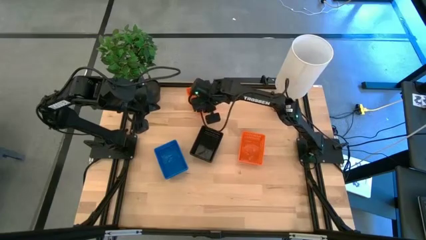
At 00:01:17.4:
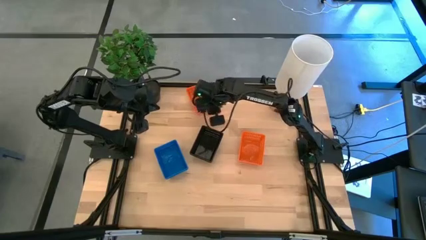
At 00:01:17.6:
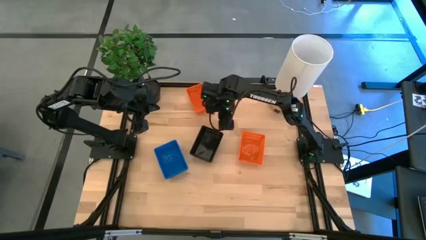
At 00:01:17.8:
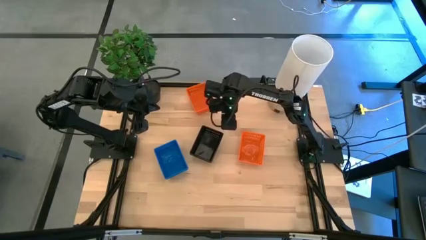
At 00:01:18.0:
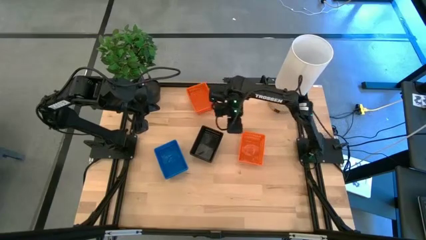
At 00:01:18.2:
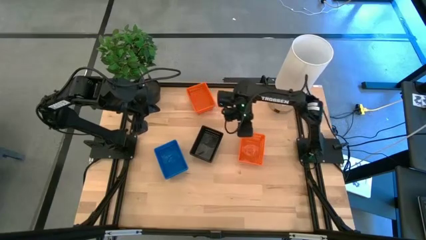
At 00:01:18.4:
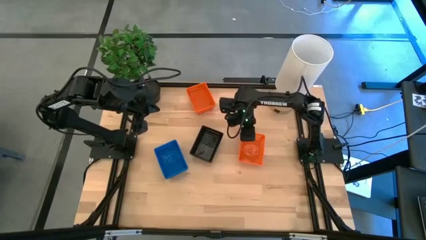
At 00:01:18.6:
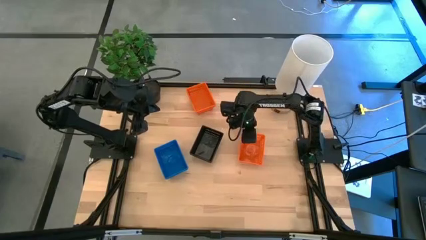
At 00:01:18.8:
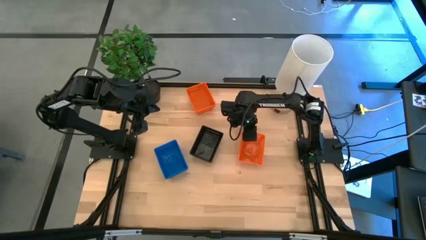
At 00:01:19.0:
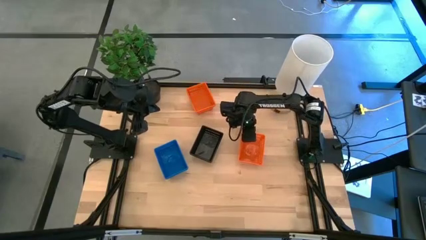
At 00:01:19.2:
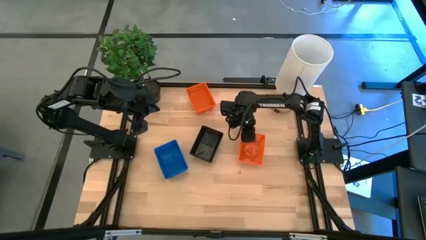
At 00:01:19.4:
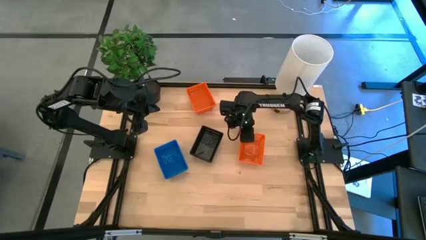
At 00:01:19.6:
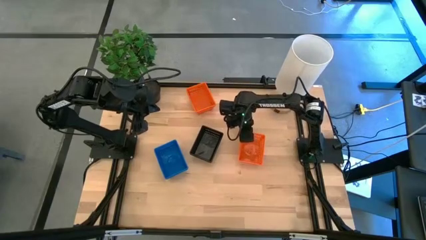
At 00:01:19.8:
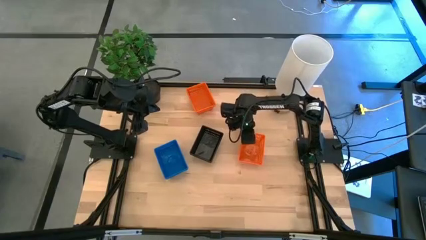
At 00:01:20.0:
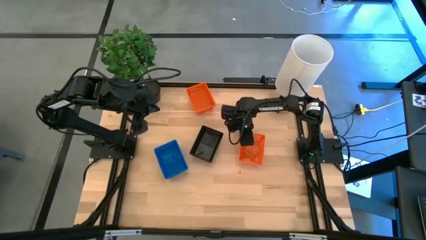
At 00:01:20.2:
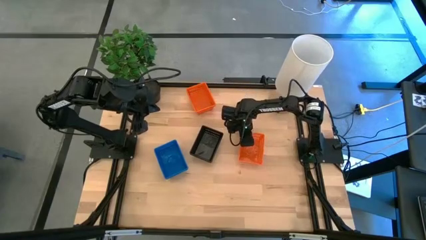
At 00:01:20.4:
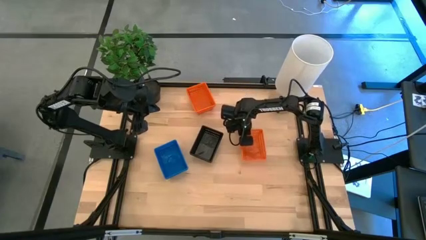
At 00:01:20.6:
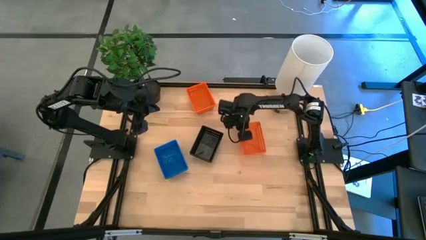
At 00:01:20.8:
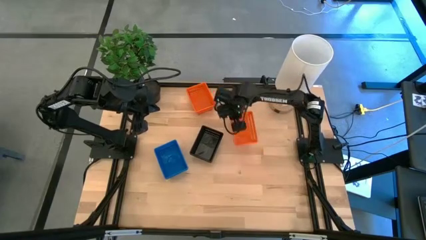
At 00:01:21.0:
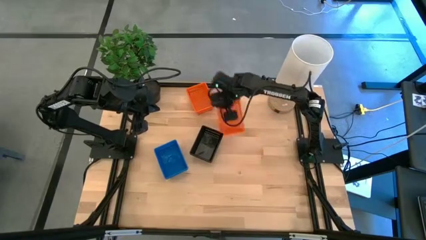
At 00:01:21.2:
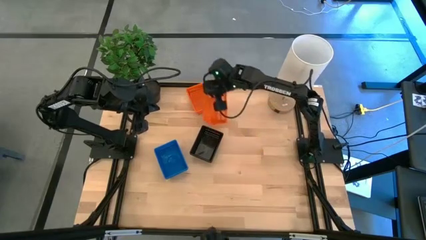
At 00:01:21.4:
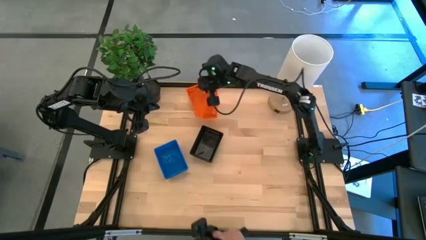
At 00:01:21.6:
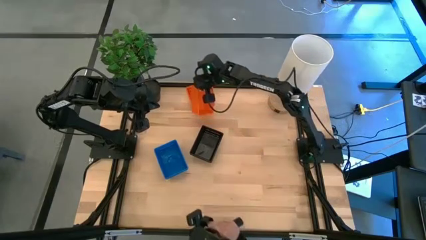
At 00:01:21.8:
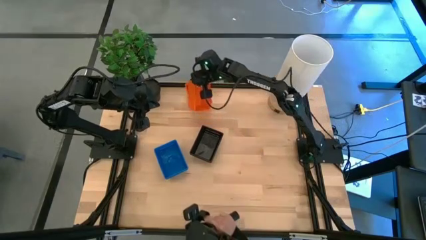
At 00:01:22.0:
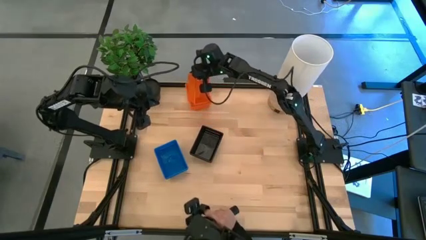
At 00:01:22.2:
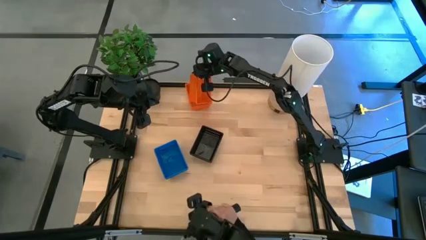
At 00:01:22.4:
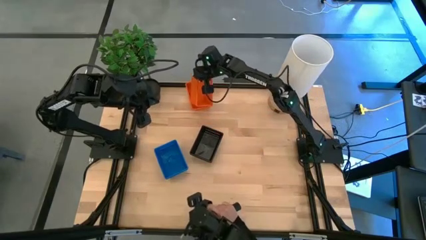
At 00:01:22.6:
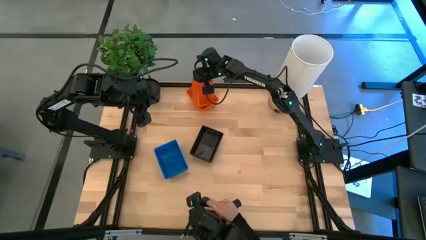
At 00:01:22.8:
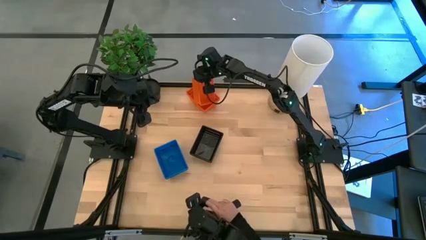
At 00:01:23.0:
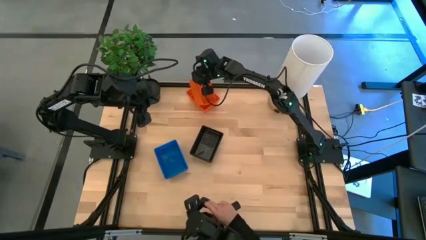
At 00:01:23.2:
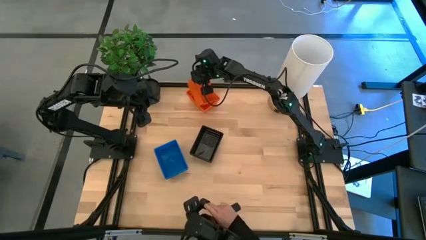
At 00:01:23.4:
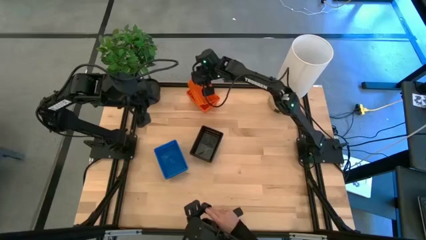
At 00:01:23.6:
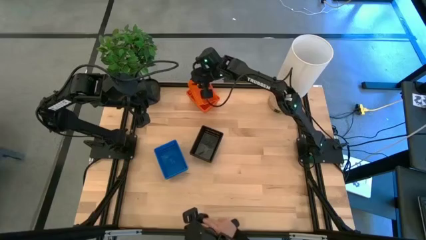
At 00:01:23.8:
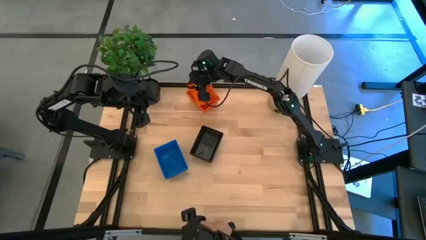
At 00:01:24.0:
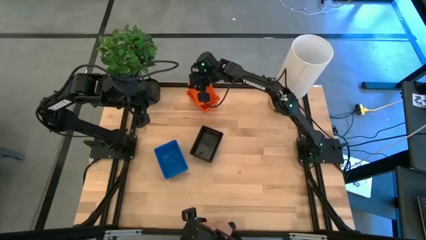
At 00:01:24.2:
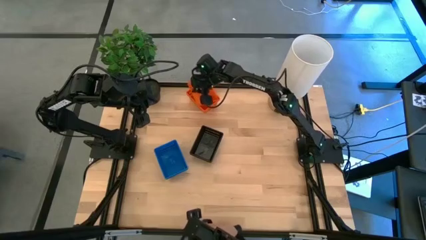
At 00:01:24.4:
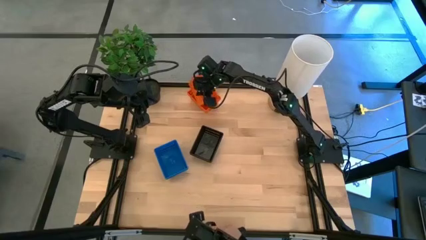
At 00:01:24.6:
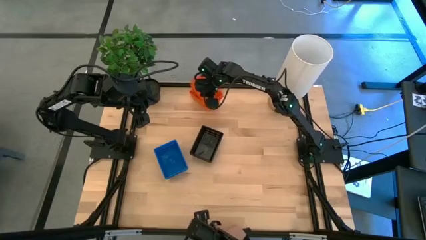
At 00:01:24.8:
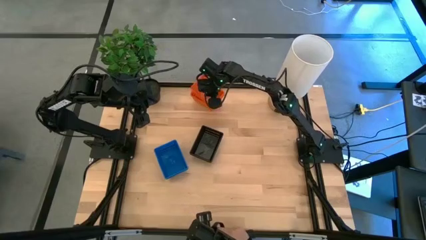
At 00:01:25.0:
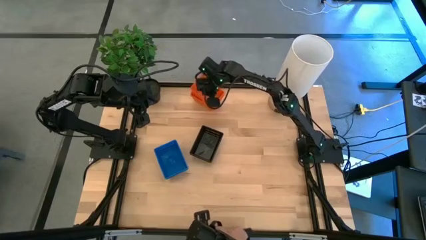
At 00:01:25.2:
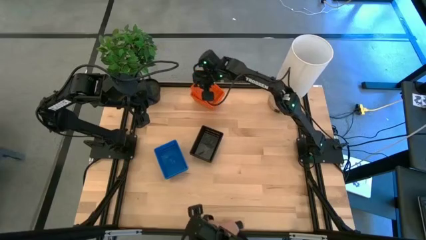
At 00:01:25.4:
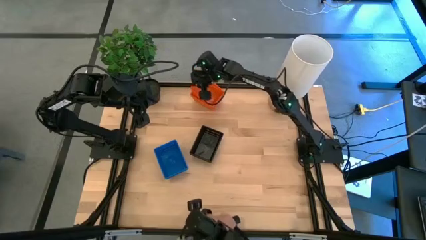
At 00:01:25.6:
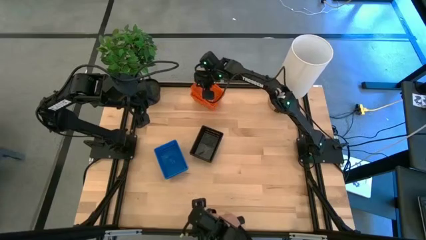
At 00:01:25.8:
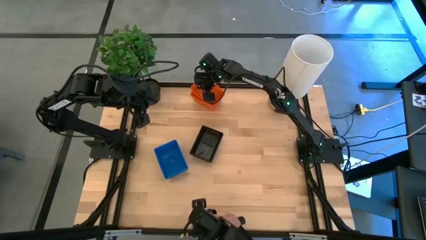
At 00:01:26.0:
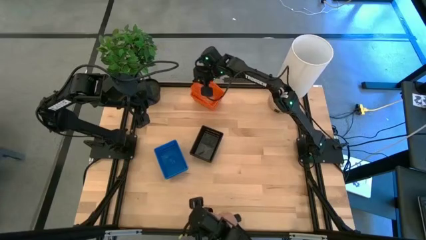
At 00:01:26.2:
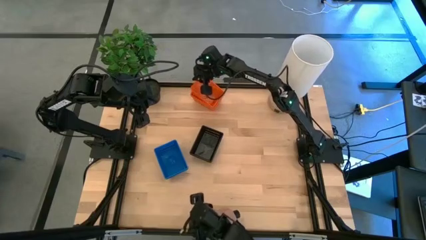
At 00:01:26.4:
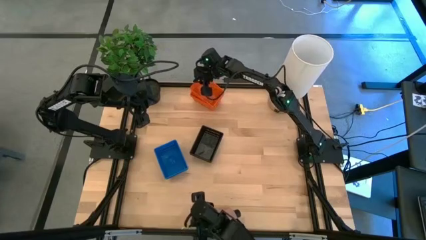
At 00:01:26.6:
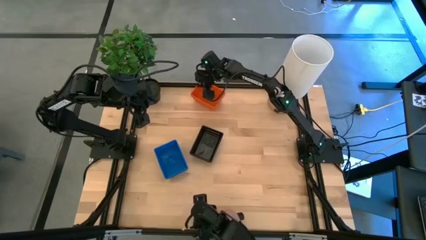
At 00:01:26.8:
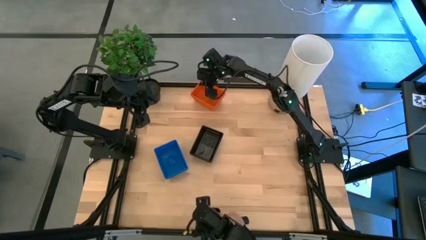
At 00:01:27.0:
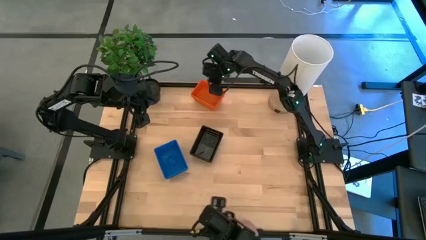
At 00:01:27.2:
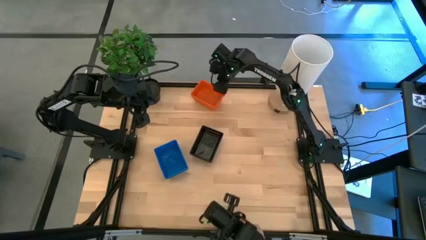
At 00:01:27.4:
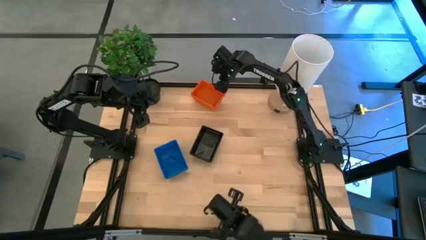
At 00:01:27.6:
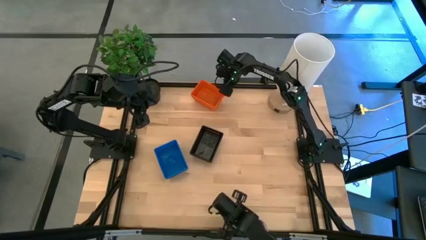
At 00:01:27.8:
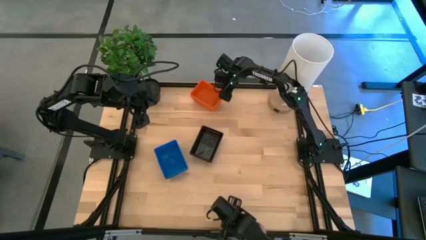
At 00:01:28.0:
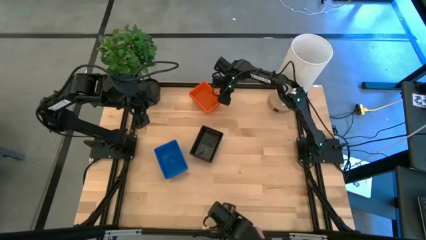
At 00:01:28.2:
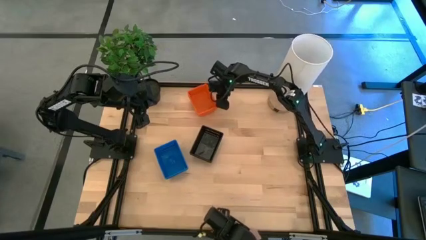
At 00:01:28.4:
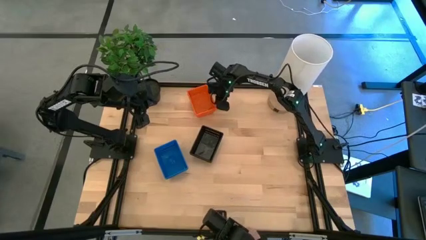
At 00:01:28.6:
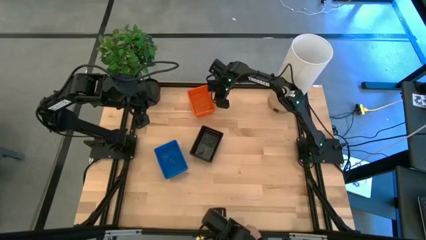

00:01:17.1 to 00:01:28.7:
Stack the bottom orange bin on top of the top orange bin

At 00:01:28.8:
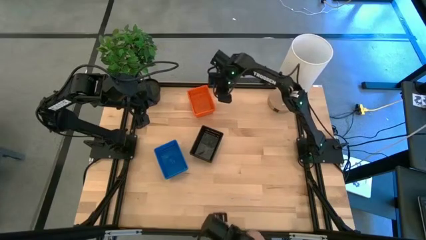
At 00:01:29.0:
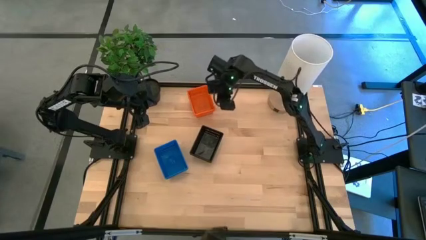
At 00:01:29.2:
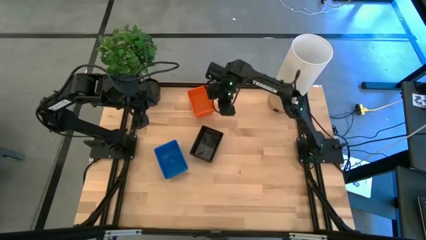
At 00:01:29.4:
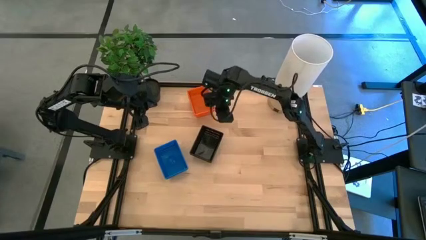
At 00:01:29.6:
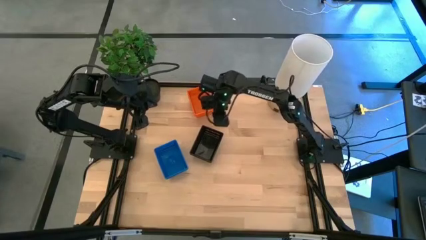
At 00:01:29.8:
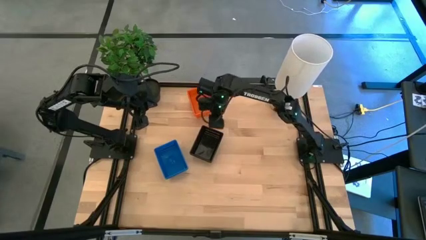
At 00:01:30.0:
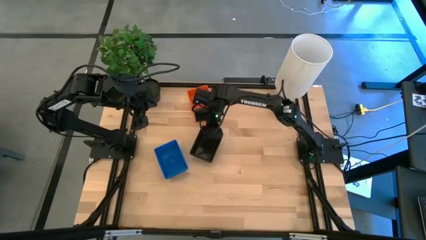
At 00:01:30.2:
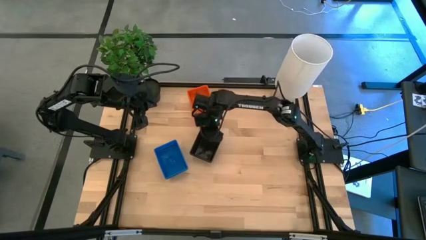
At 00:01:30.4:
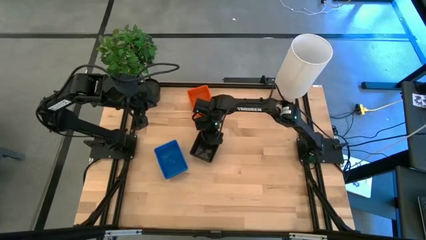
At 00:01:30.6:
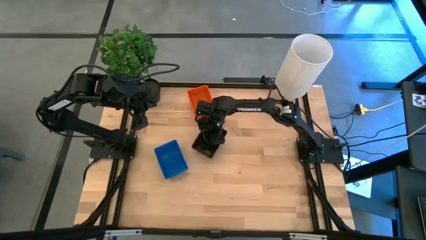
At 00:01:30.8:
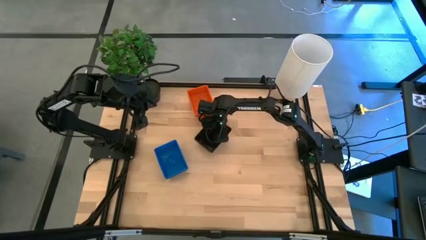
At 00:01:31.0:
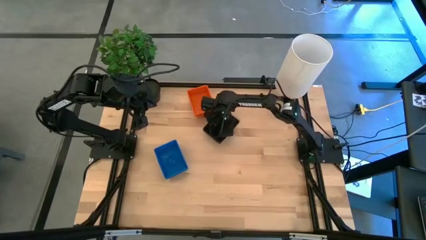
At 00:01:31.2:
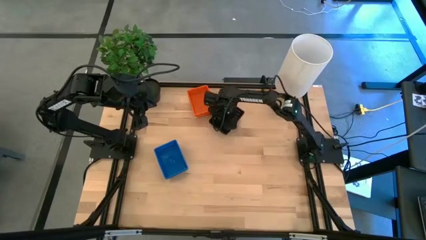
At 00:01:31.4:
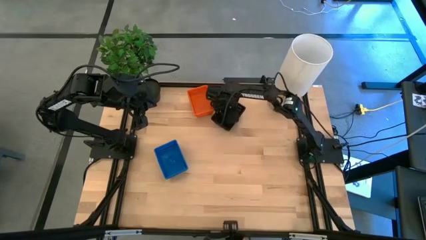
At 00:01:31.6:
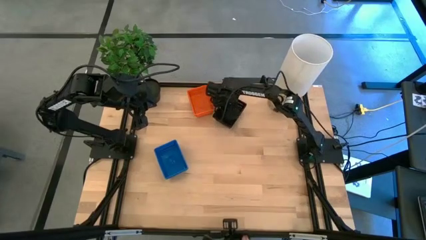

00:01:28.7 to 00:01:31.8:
Adjust the stacked black bins

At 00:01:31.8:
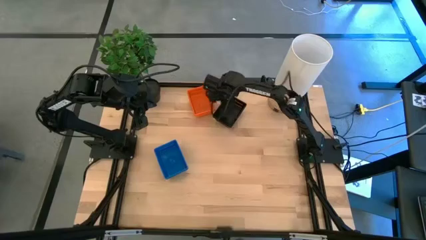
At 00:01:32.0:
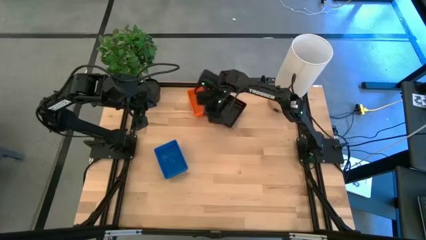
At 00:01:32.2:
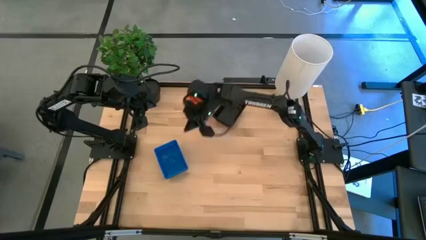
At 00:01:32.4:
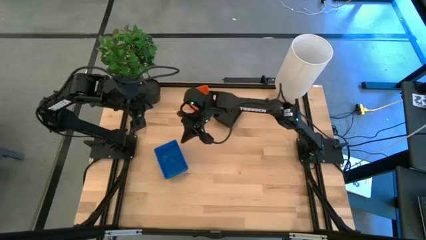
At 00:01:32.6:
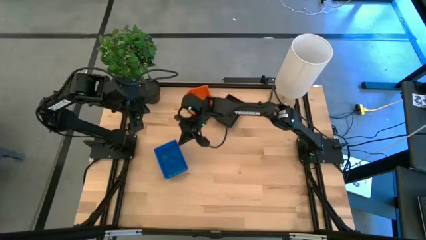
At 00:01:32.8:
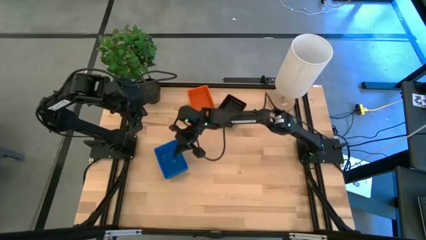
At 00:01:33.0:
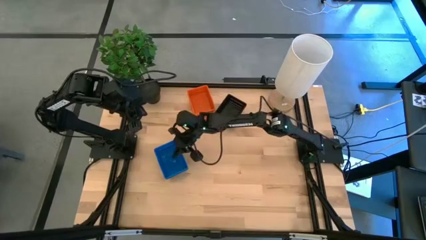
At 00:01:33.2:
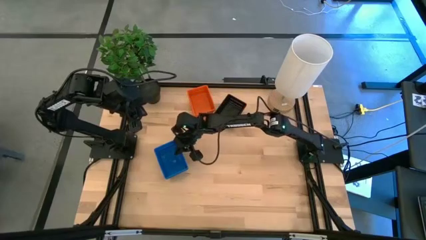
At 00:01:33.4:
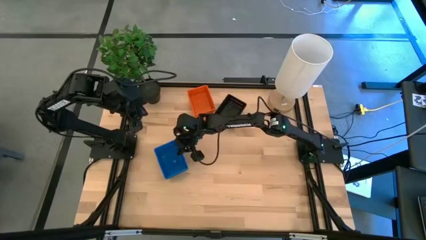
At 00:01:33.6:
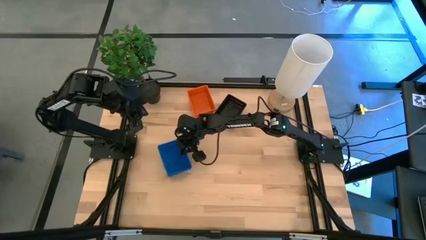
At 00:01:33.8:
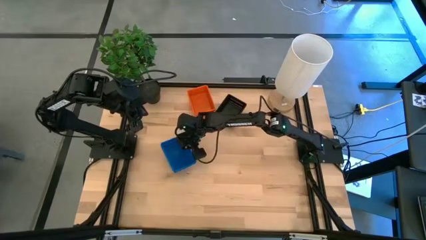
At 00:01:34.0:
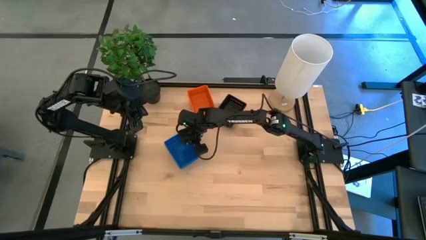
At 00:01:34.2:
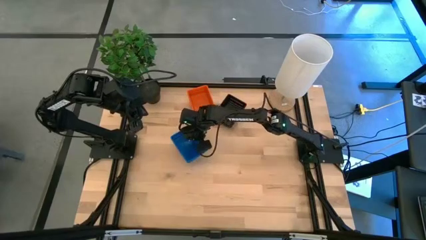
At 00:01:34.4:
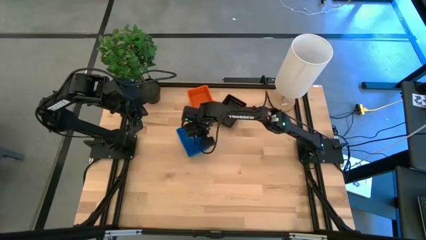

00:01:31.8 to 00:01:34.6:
Adjust the stacked blue bins
